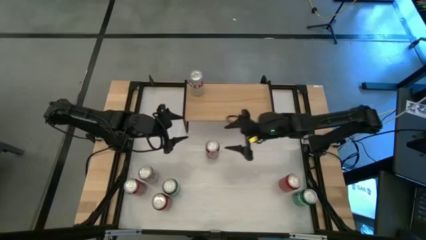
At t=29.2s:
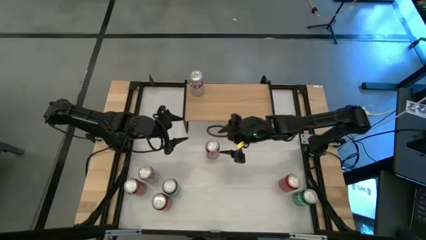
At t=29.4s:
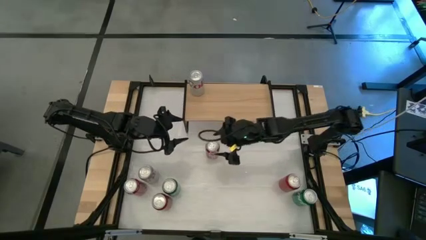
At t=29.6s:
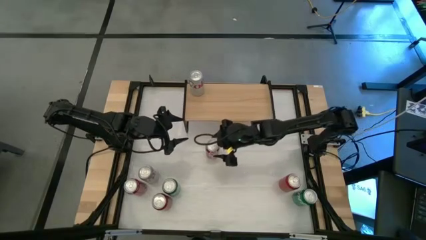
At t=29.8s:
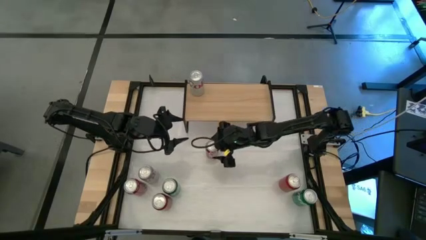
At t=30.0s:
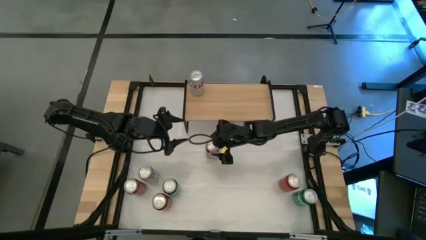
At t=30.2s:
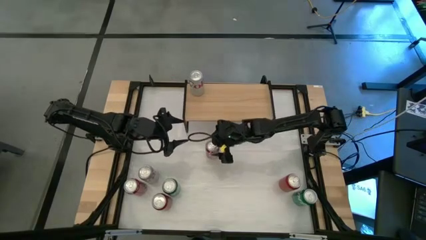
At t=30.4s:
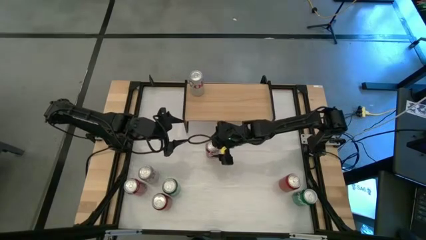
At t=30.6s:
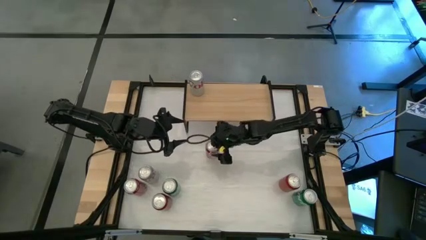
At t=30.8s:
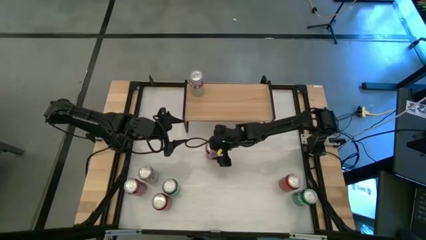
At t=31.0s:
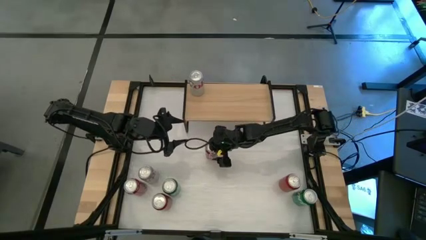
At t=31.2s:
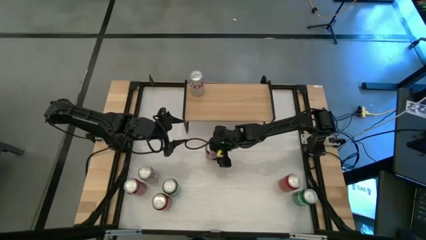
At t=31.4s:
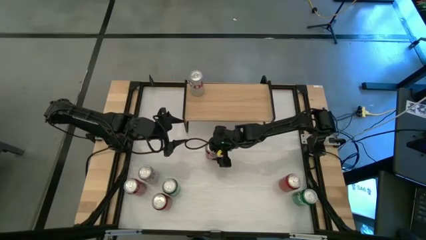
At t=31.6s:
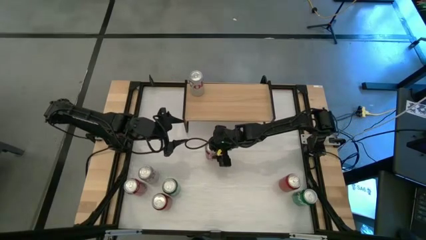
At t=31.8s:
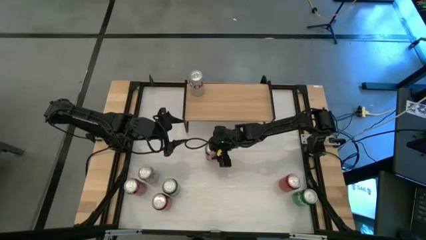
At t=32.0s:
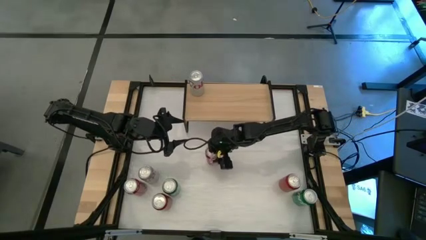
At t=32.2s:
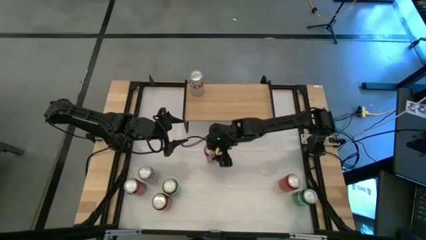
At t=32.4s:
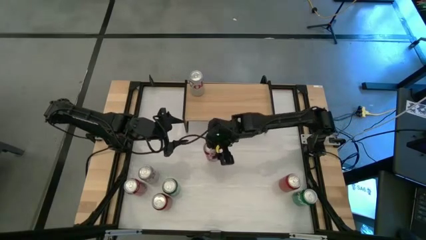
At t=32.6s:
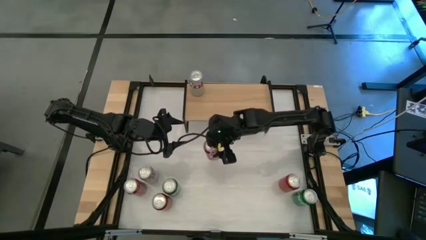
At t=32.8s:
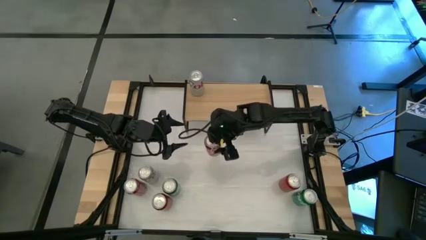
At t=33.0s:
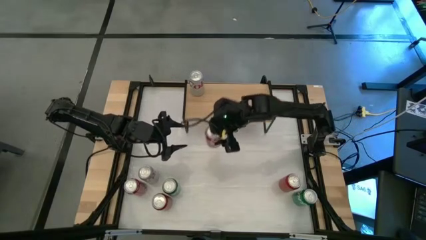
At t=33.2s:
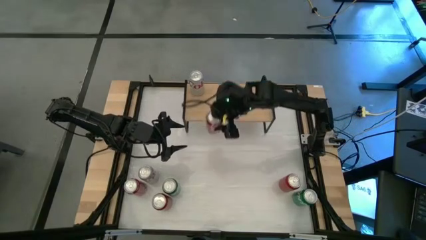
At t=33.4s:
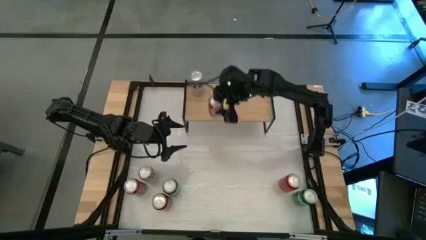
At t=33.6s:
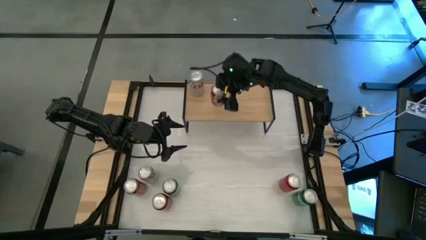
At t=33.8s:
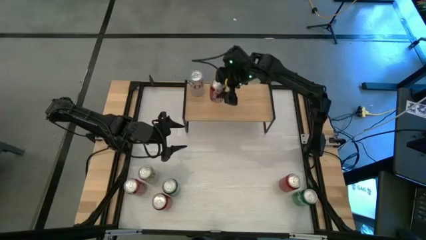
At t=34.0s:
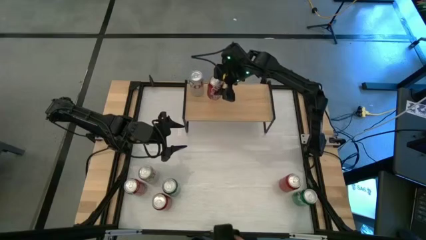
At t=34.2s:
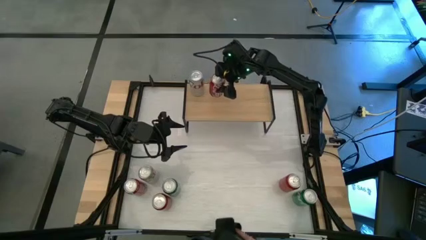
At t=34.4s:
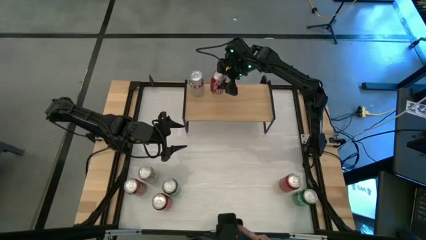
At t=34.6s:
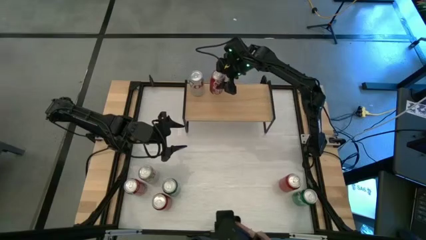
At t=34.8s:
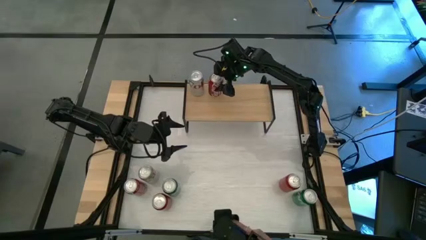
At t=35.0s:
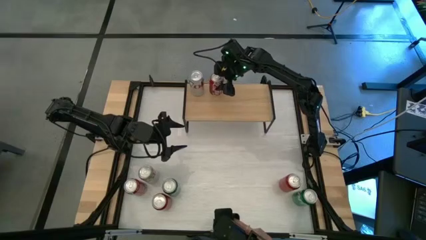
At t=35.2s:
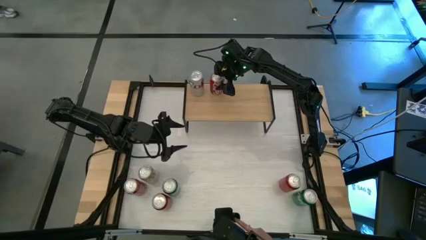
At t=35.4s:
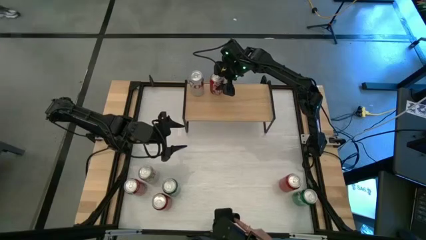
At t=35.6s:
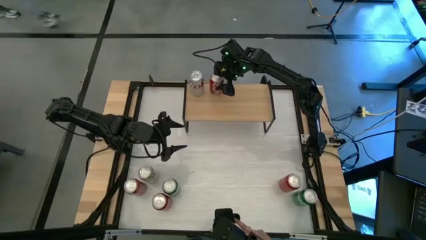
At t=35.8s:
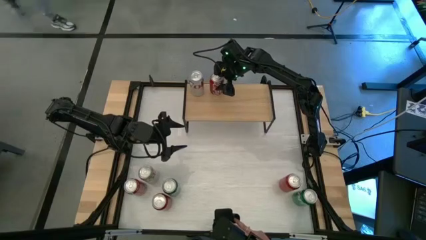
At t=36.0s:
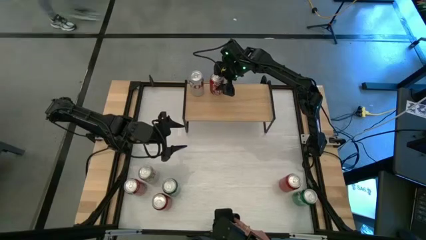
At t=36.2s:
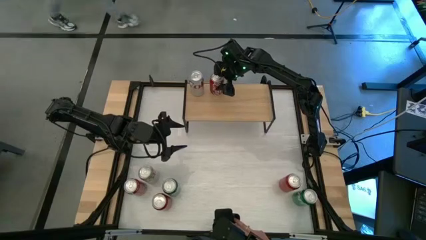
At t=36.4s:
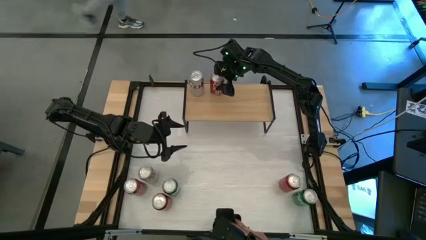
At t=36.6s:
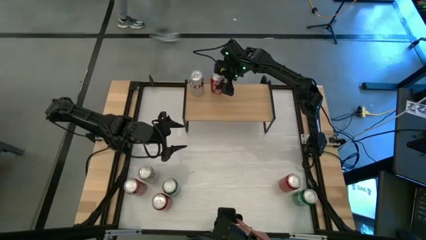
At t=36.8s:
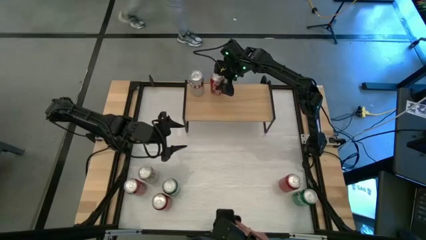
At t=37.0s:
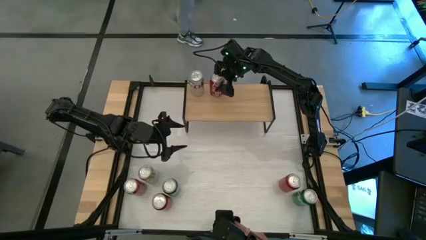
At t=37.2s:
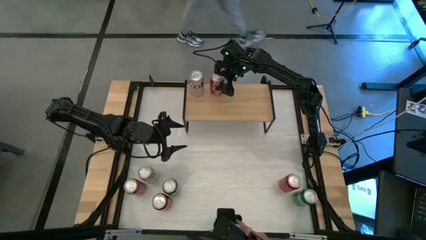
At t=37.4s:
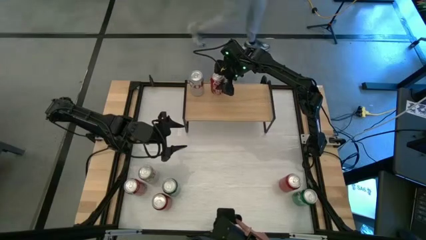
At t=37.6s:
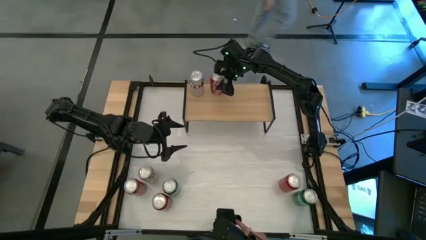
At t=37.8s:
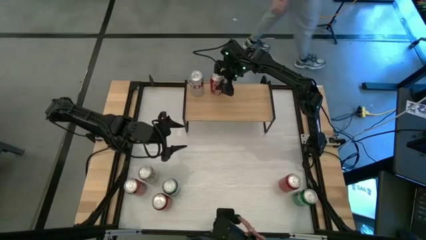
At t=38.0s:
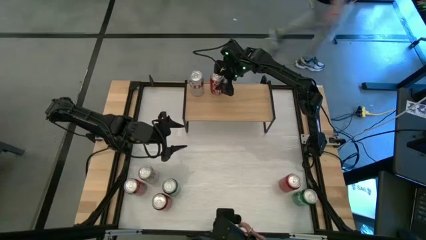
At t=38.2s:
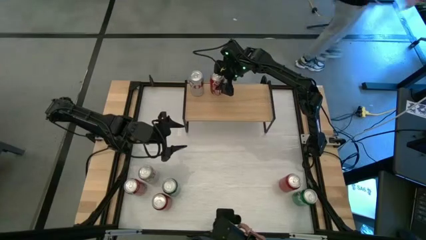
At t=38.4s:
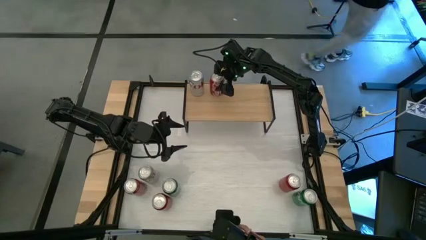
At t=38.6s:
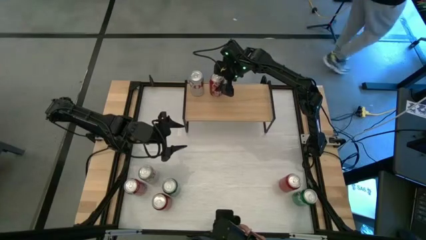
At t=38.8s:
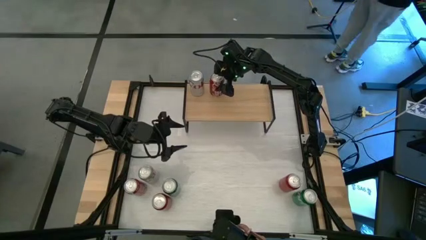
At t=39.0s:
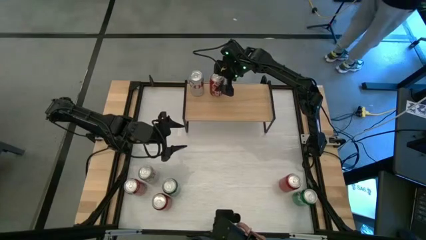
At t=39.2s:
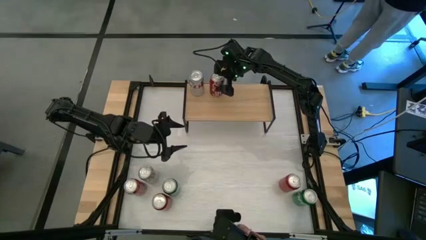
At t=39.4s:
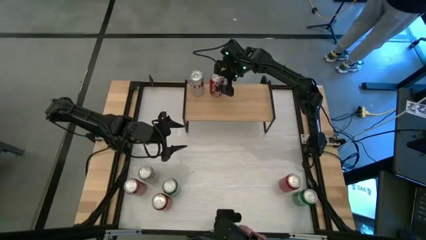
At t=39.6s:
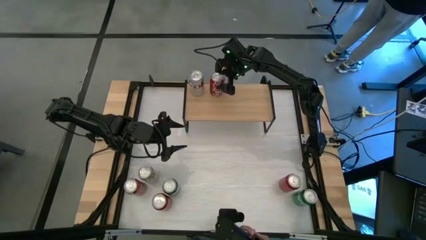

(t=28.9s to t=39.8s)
Task: Place canned beverage on shelf
Put the top red-white soda can on the shelf

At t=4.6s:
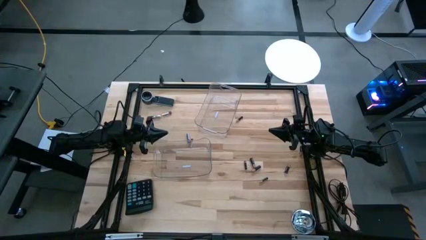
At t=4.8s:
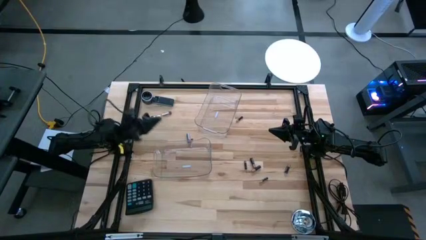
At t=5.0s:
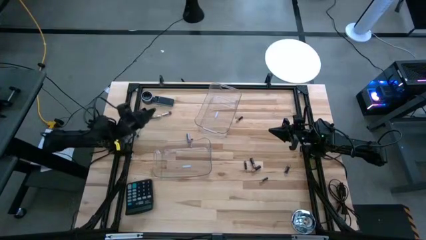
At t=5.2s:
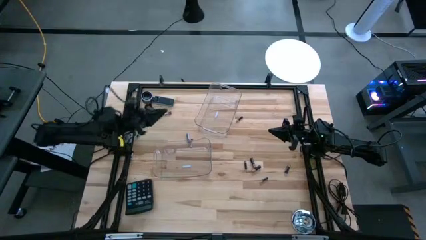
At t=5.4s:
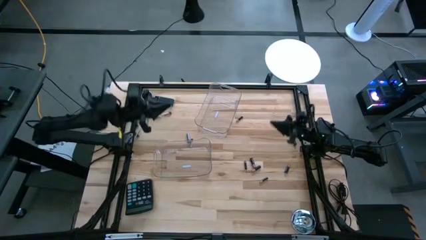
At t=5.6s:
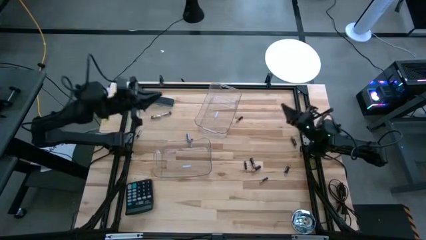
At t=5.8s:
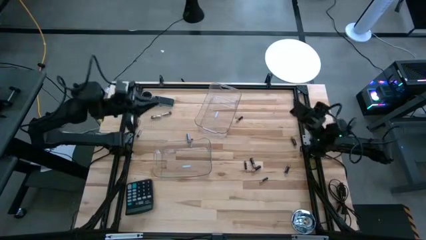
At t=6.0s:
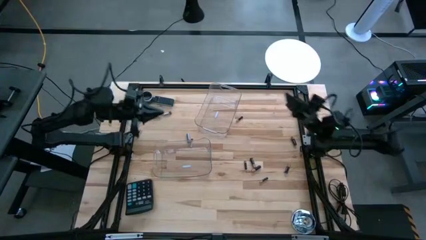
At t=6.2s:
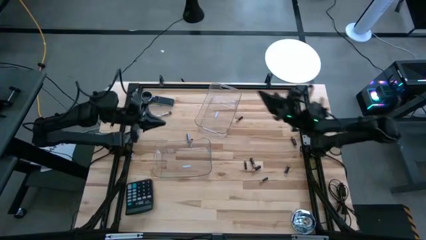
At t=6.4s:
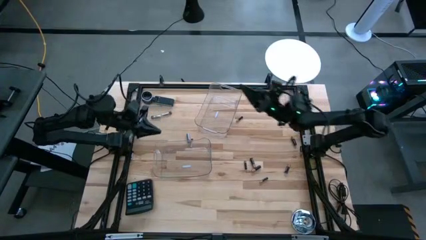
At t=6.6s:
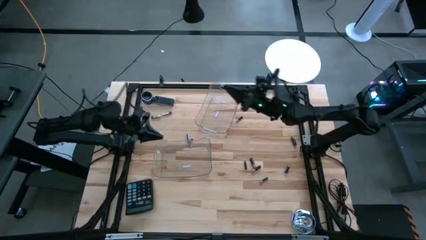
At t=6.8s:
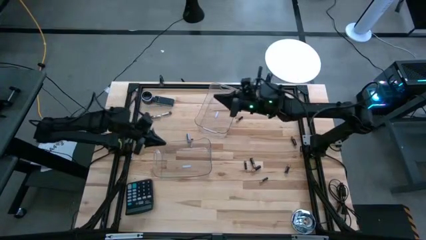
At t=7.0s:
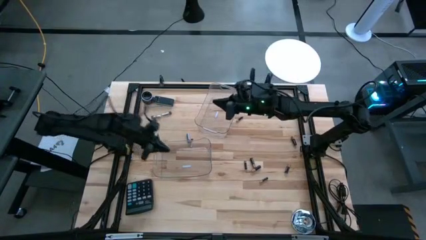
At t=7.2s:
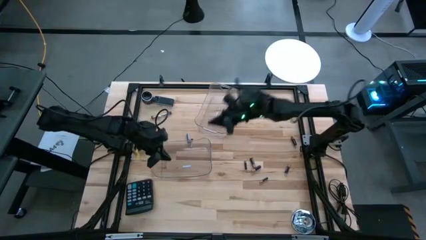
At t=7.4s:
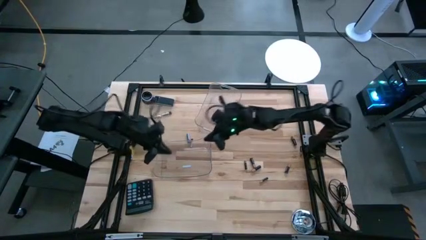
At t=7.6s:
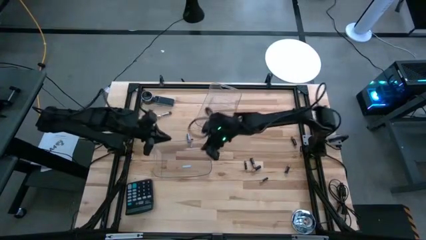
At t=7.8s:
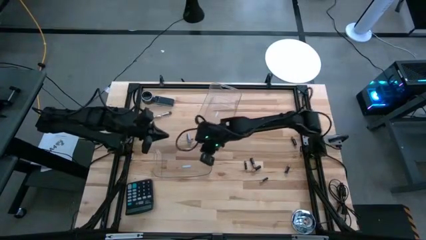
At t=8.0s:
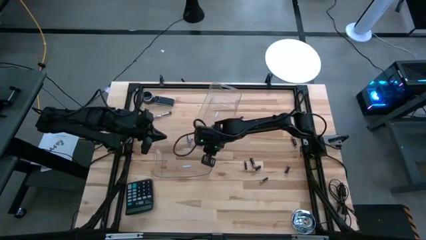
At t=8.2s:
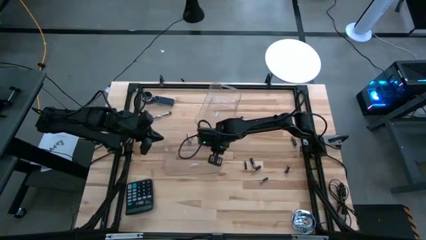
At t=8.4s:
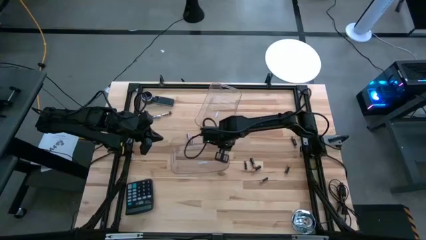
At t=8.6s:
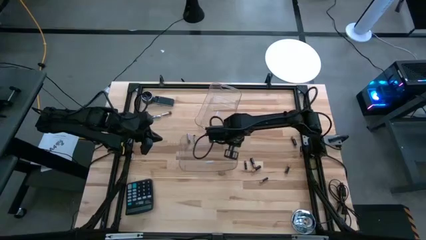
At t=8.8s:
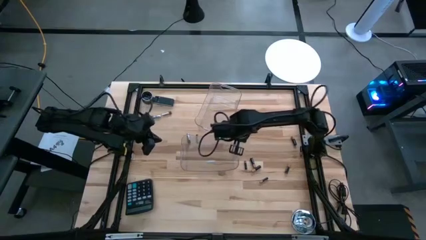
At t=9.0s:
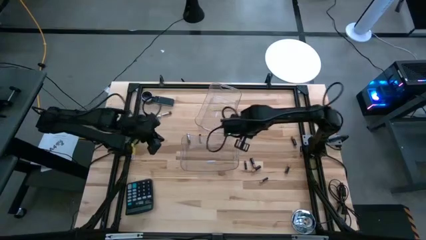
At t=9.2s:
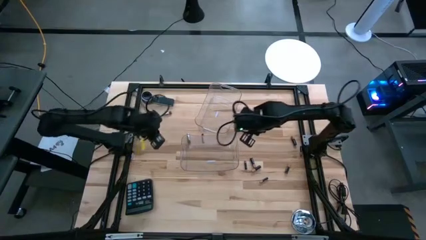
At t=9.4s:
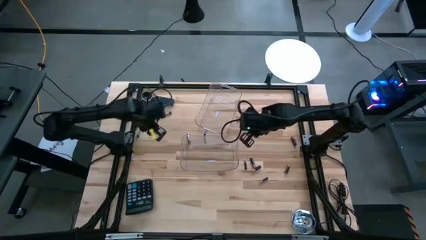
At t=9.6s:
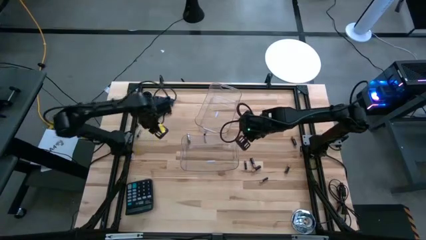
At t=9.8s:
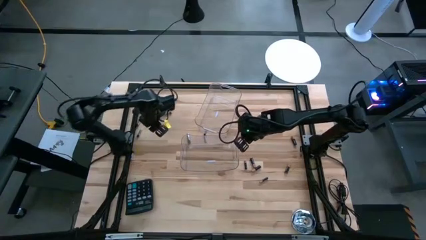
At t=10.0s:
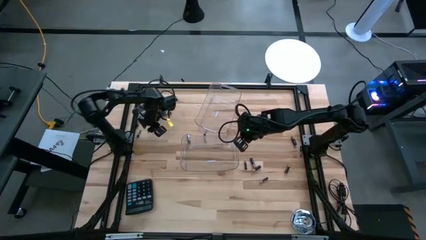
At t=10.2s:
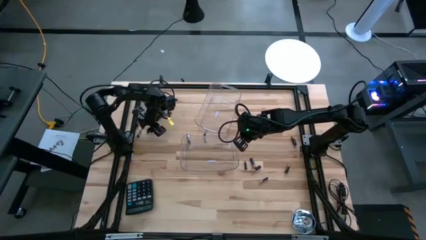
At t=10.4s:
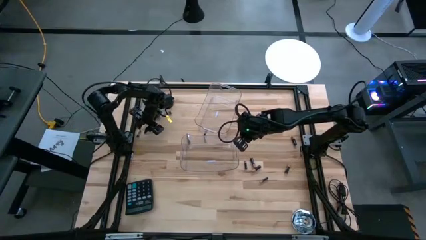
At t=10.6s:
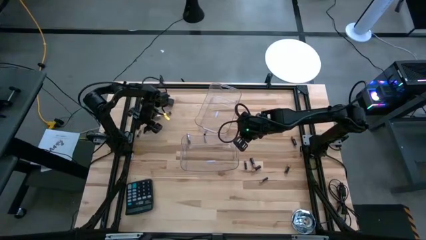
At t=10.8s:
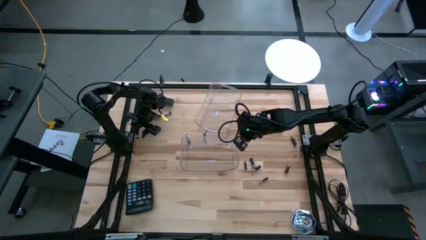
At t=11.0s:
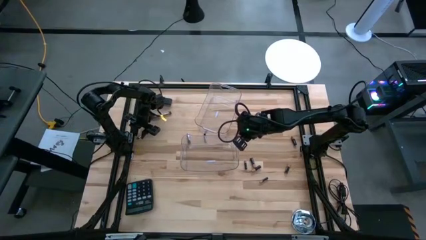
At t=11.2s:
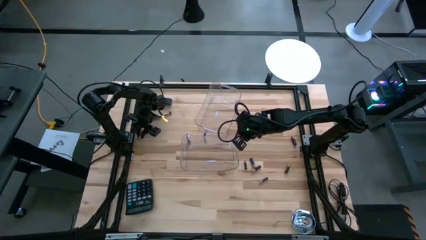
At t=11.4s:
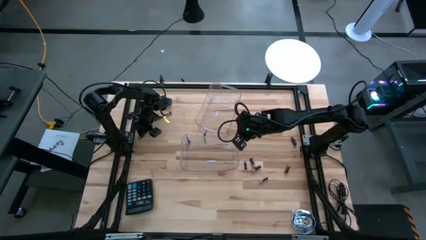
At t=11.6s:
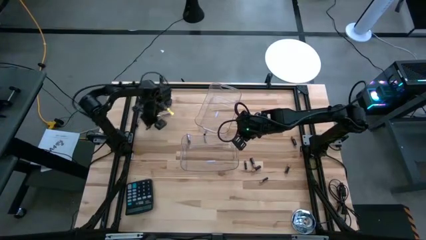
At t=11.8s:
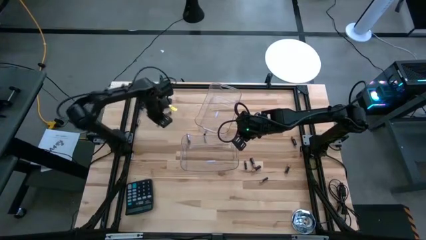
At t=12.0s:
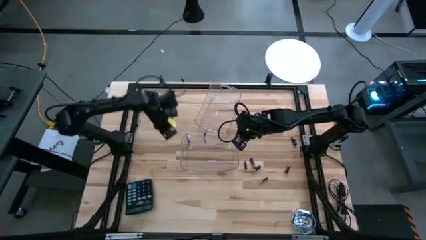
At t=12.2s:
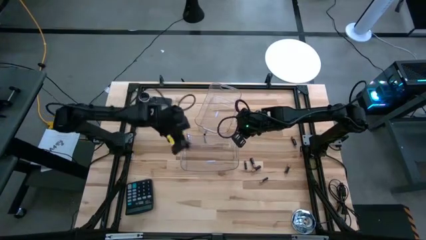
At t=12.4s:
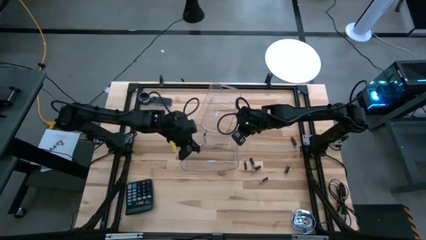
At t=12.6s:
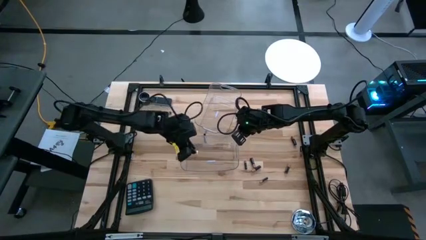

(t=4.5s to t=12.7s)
Task: Sort batteries
Put the silver battery into the bottom transparent bin
